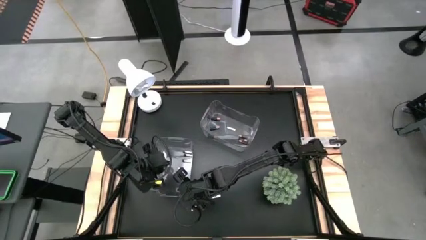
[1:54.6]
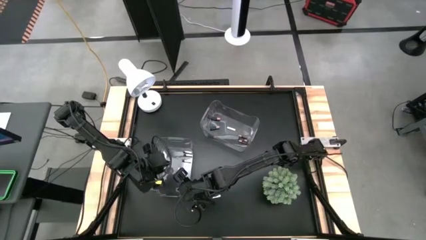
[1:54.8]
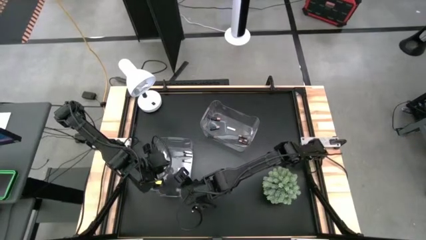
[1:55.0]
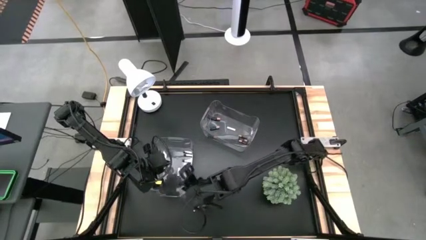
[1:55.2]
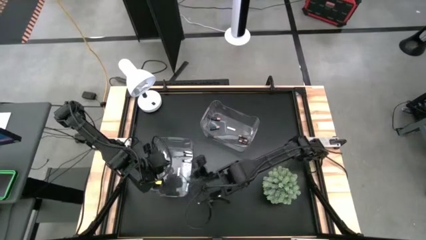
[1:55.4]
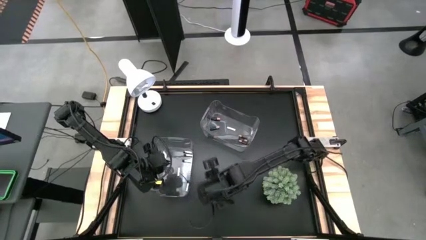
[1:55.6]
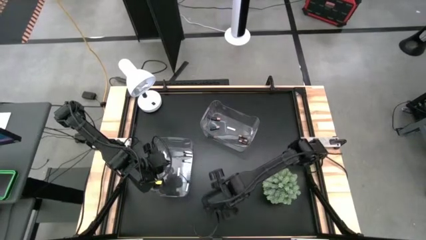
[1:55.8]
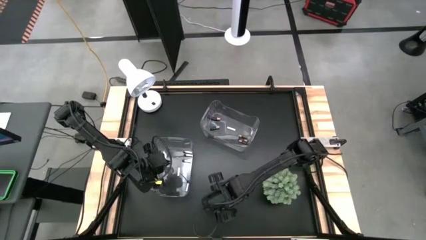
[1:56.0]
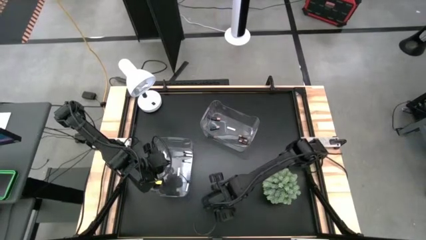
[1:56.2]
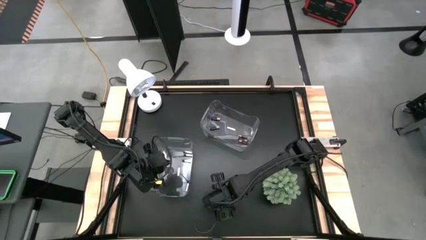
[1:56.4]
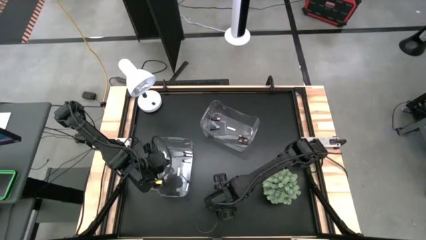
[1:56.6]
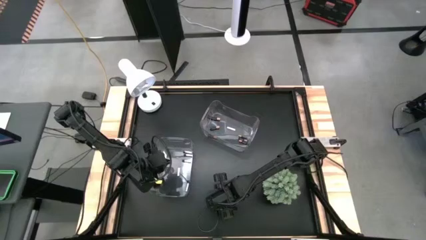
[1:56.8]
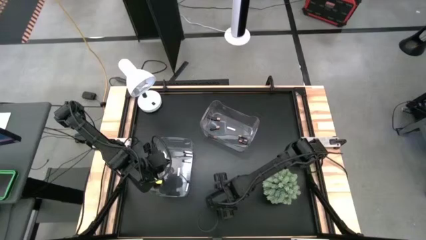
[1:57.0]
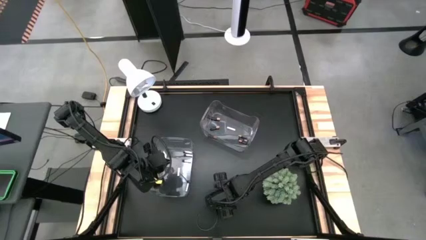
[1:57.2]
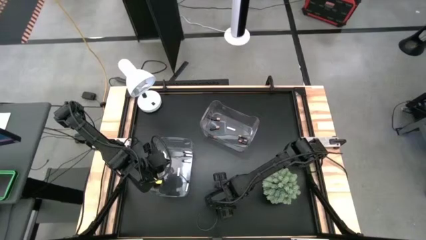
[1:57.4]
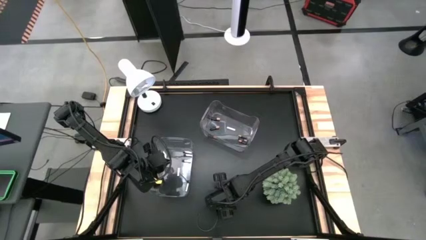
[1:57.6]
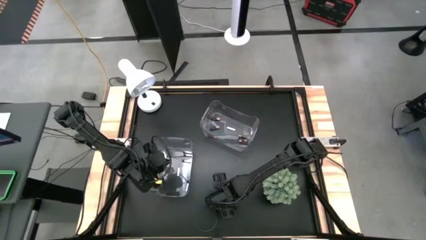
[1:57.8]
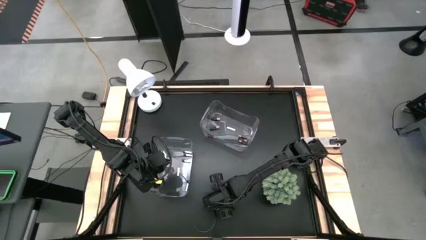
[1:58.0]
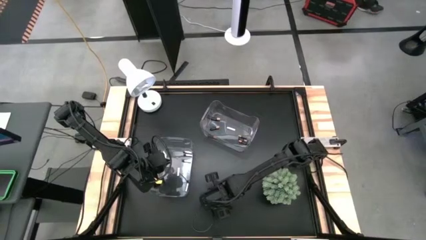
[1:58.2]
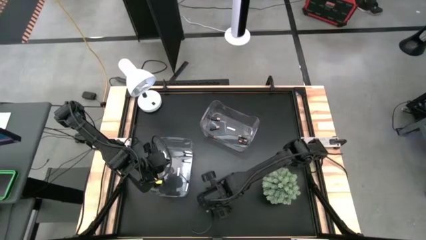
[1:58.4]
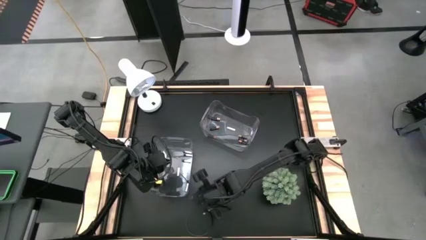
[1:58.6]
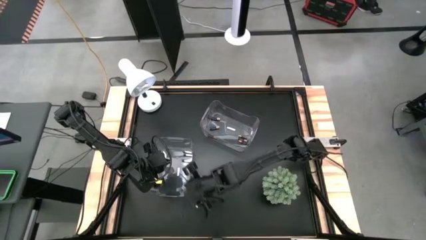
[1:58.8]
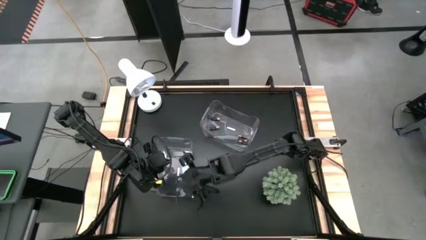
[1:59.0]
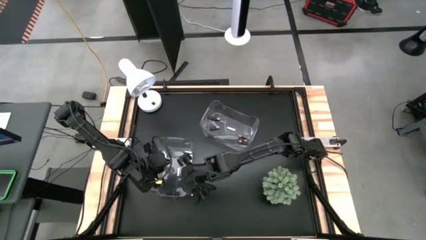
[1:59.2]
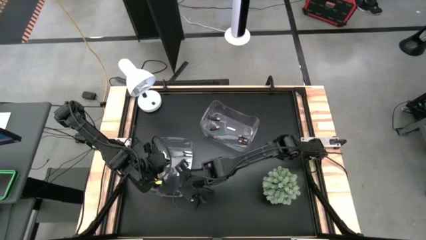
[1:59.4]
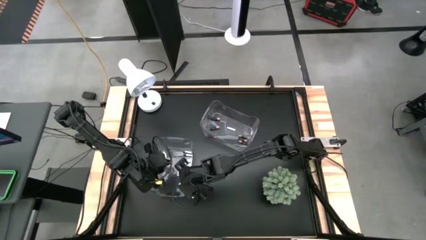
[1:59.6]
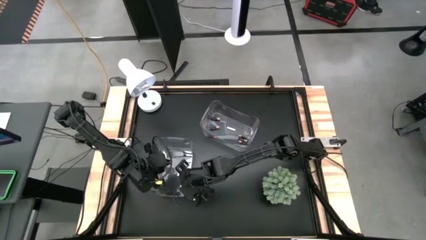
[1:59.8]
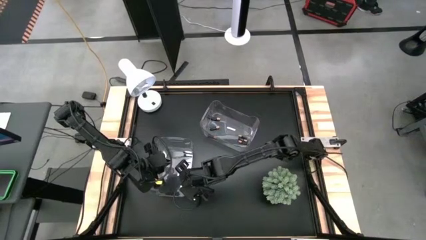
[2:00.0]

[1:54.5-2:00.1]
Task: Sort batteries
Put the silver battery into the top transparent bin

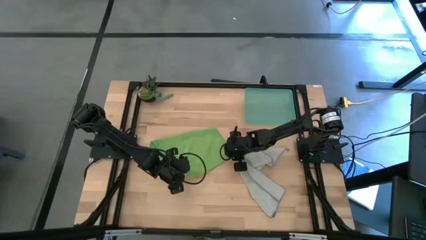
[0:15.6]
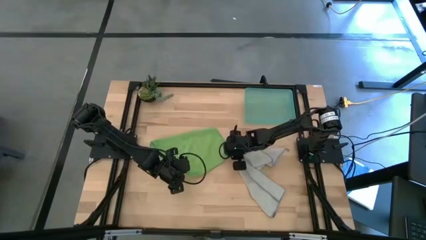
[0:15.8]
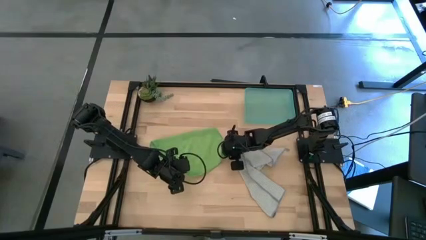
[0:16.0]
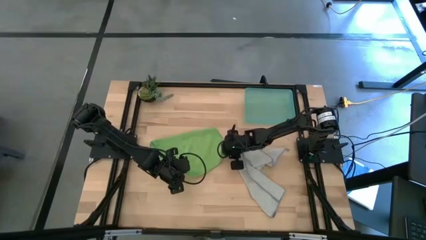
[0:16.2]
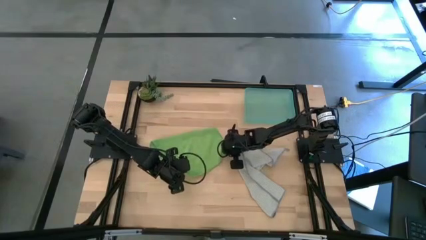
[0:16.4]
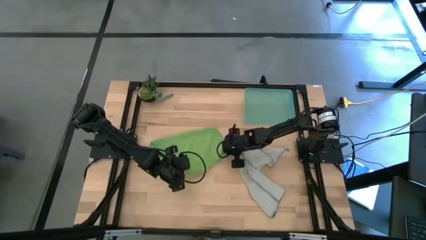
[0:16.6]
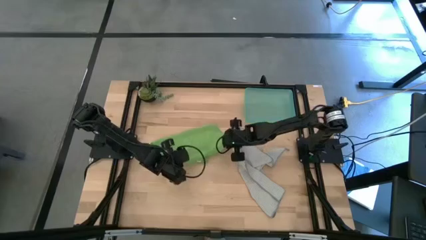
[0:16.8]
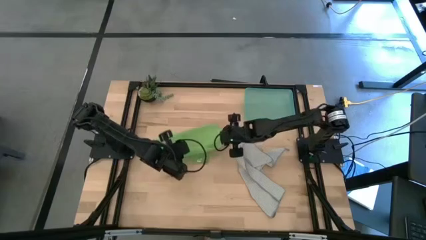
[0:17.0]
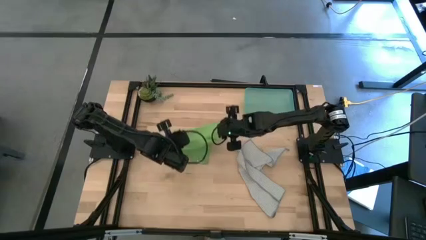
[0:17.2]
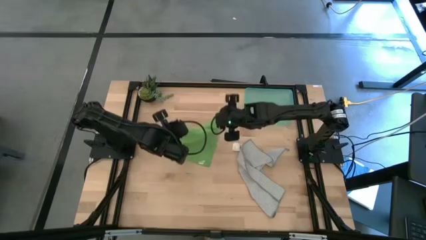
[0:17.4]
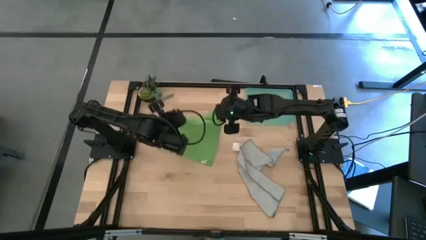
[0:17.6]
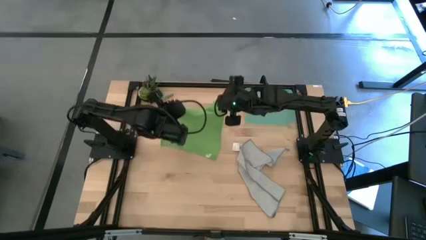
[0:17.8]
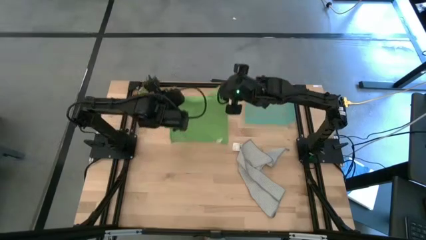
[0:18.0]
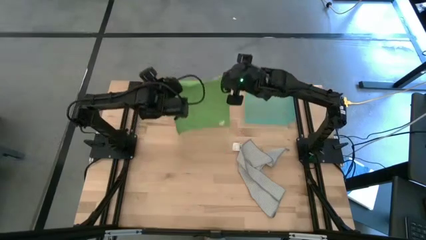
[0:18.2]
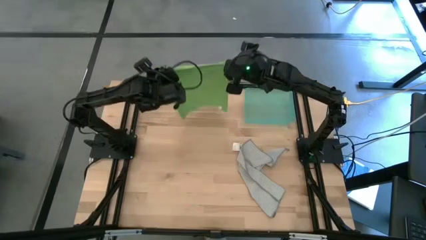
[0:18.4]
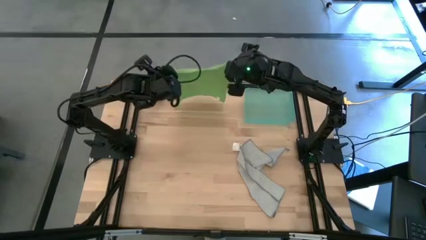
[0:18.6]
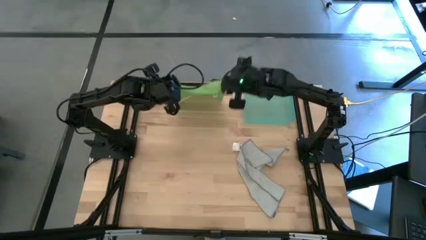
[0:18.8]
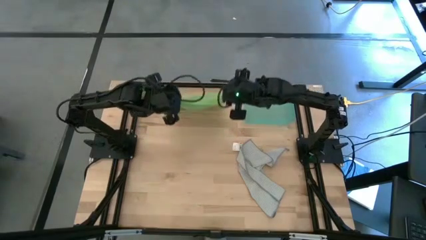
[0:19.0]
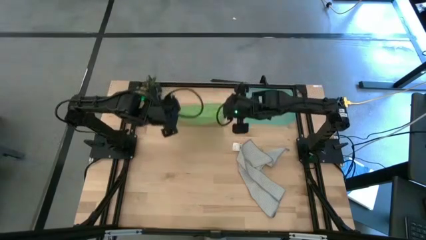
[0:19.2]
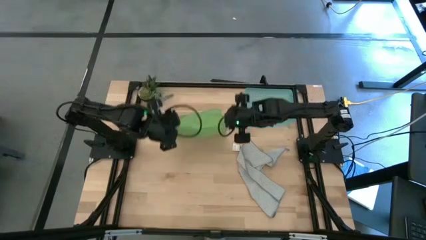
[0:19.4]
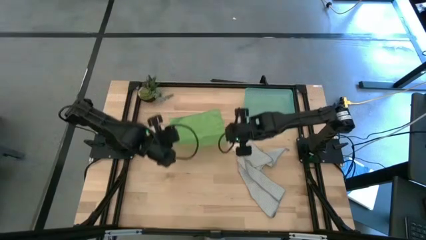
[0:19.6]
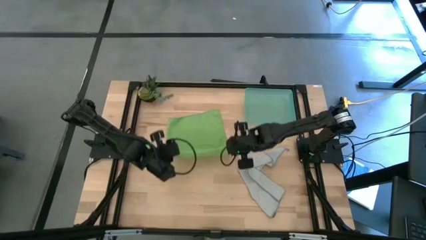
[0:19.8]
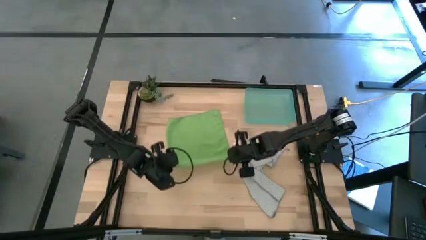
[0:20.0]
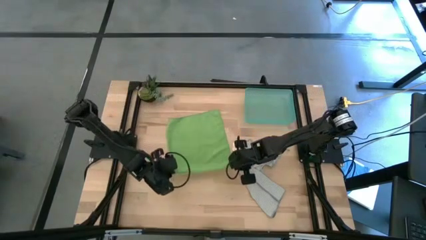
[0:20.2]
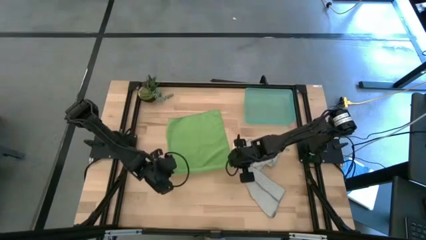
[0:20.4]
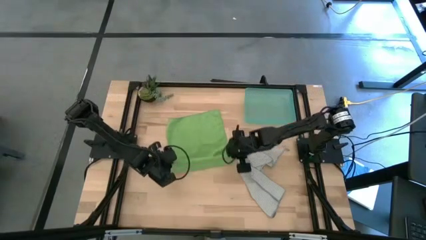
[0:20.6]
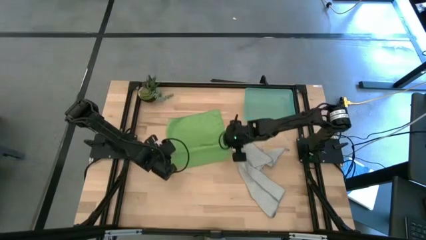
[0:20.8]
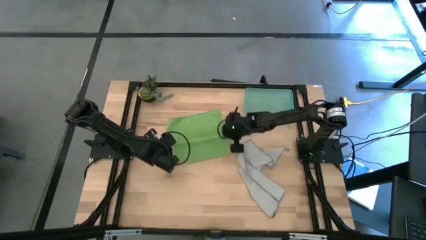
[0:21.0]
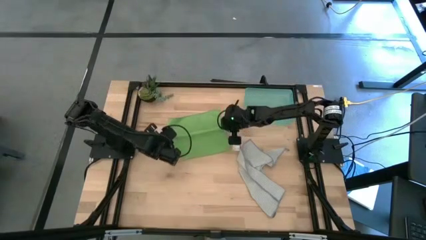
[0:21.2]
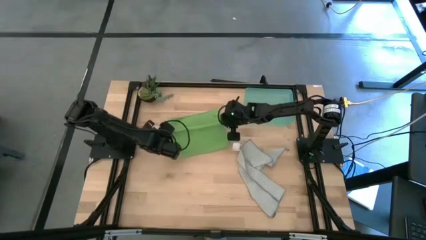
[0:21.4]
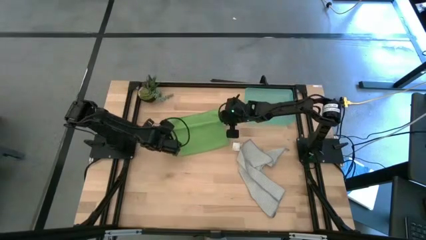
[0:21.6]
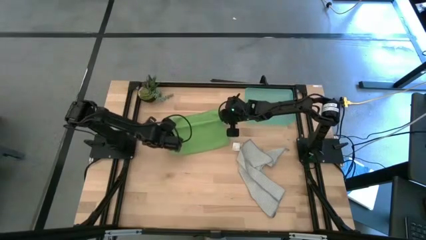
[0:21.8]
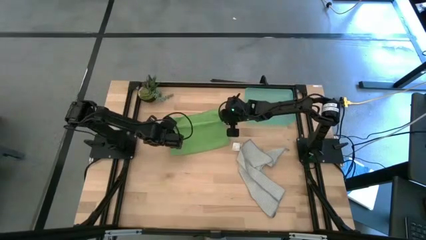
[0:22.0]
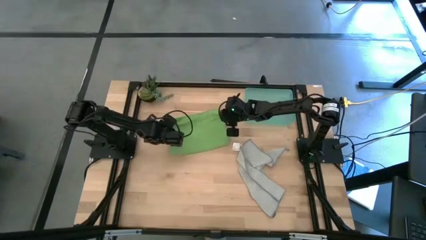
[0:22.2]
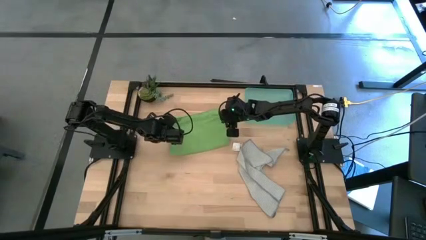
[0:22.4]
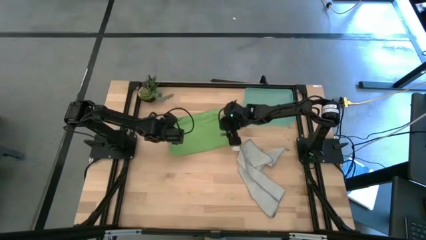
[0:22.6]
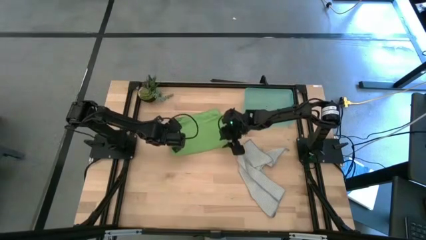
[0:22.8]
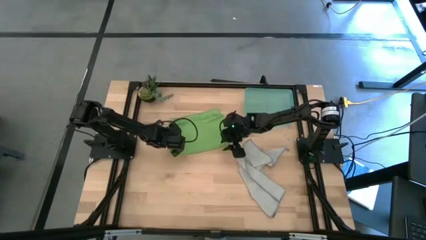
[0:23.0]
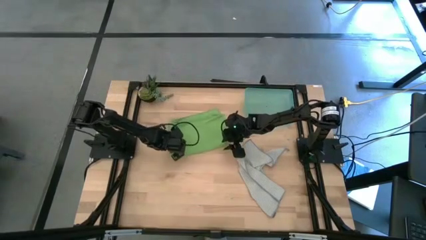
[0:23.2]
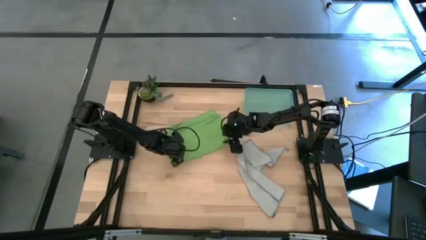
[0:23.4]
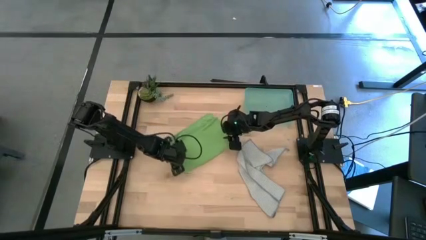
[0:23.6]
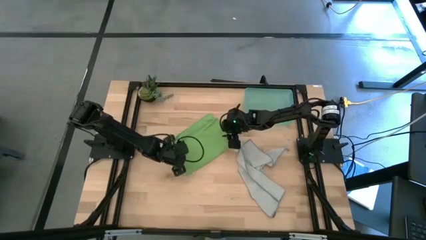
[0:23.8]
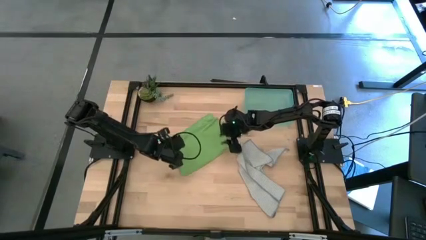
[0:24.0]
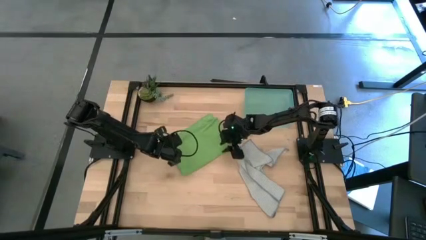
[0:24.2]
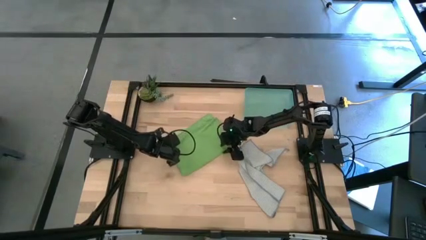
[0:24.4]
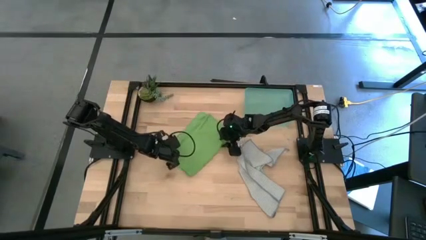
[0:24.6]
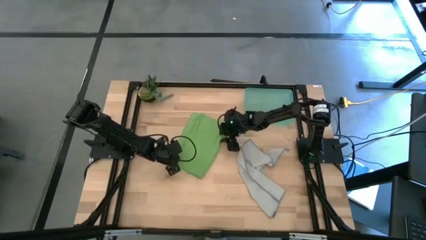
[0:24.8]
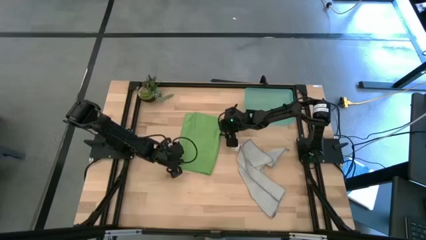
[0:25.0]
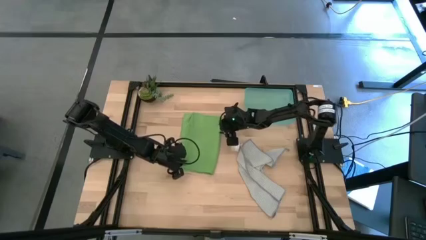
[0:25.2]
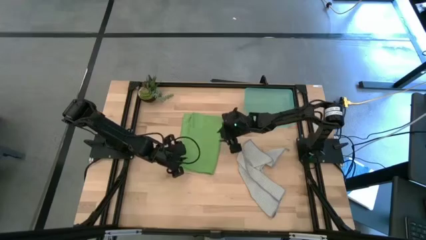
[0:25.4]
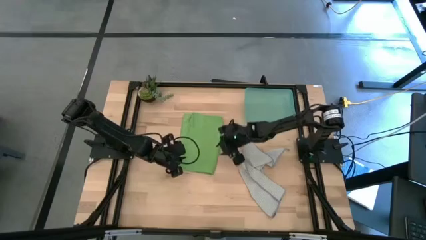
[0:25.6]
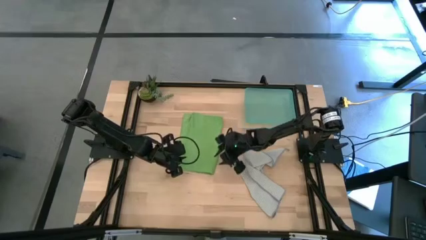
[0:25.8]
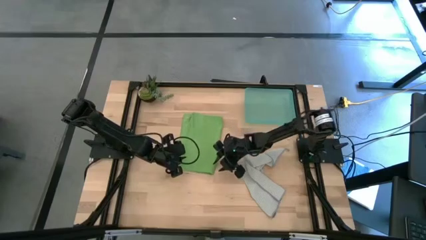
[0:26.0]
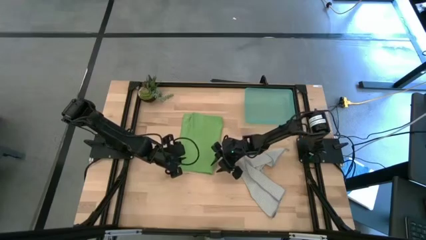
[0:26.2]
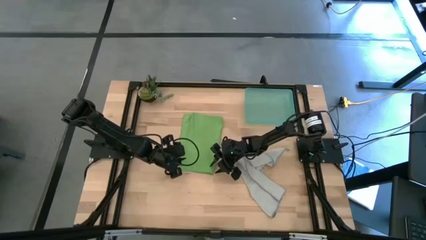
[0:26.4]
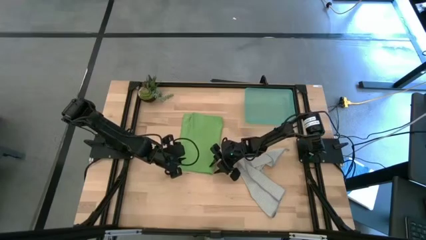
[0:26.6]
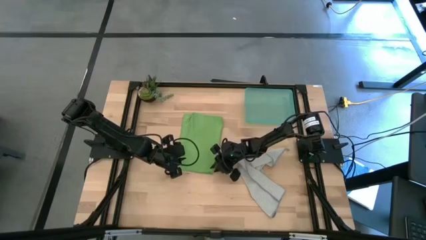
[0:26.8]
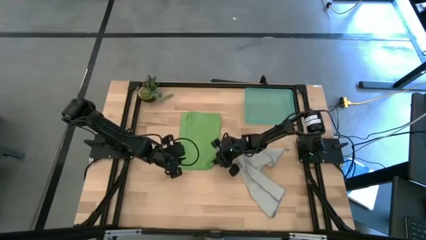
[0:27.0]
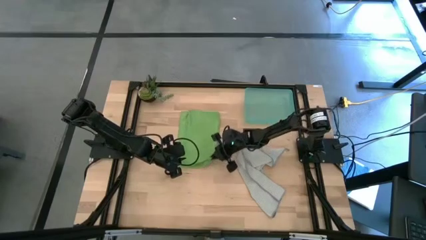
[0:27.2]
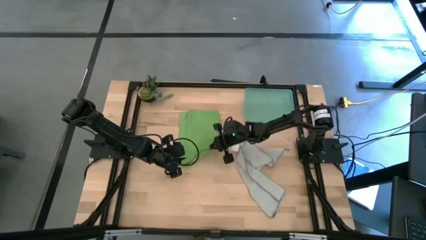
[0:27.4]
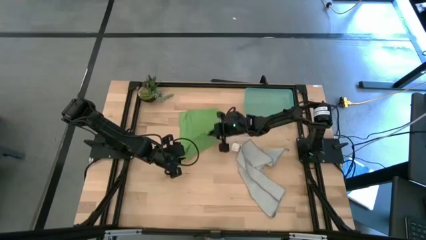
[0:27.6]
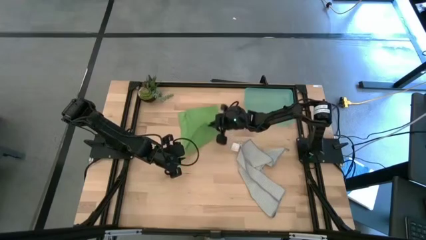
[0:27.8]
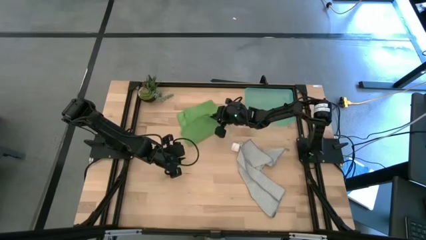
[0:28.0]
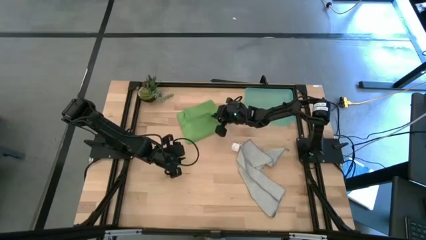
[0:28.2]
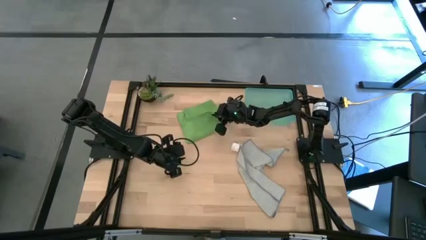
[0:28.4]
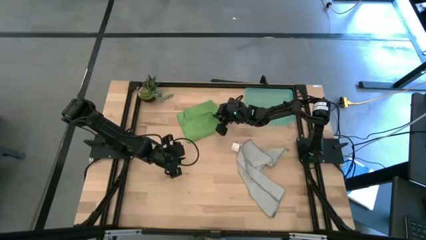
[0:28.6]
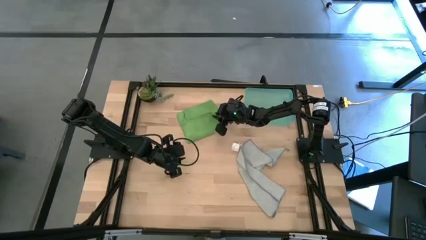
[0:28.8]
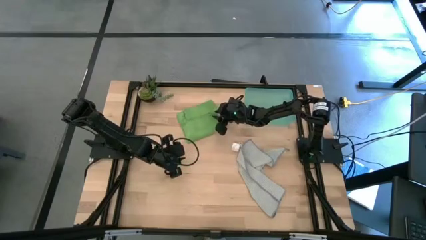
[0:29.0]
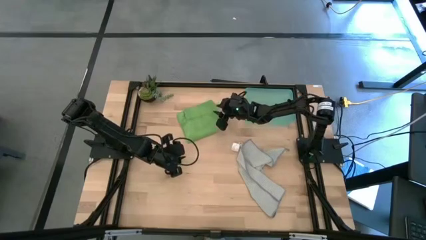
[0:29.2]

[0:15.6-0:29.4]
Task: Roll microfiber towels into tight, uniform cylinder then place into a basket
Fold the green microfiber towel
